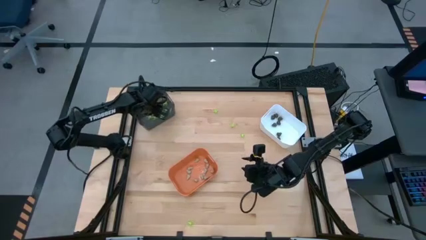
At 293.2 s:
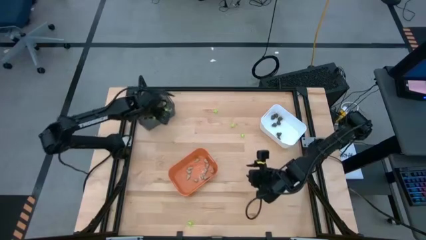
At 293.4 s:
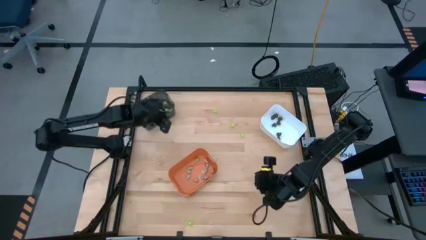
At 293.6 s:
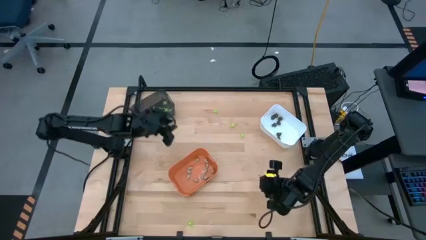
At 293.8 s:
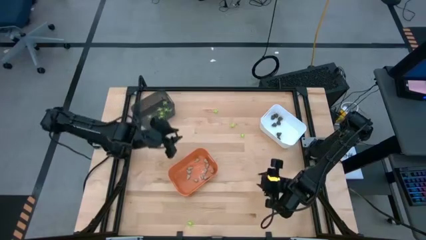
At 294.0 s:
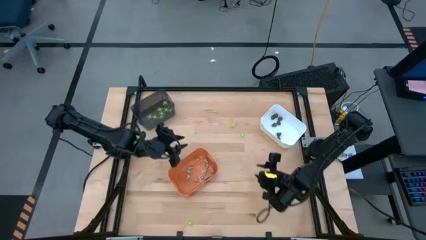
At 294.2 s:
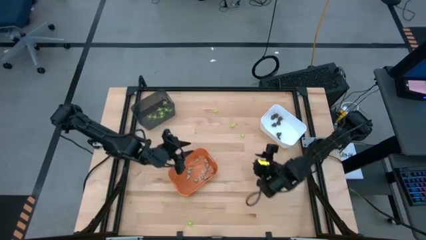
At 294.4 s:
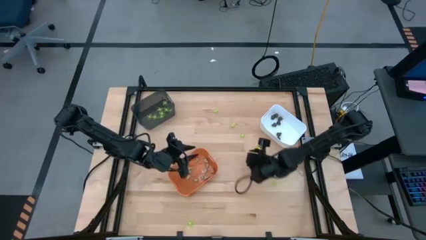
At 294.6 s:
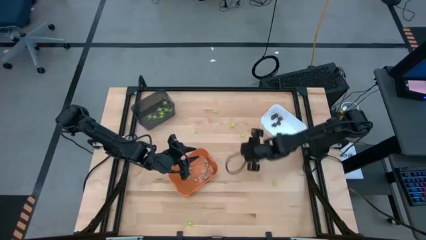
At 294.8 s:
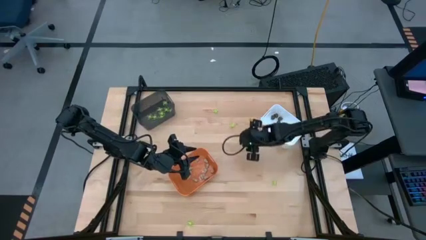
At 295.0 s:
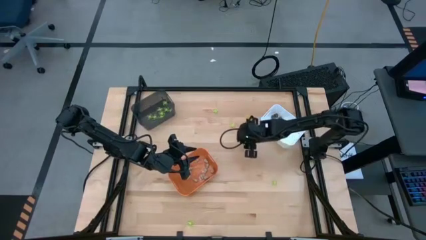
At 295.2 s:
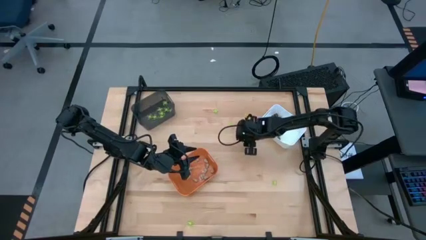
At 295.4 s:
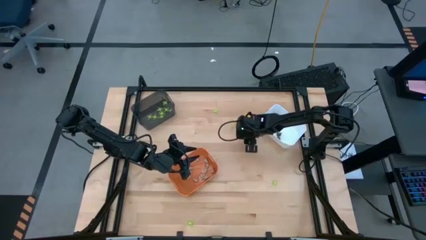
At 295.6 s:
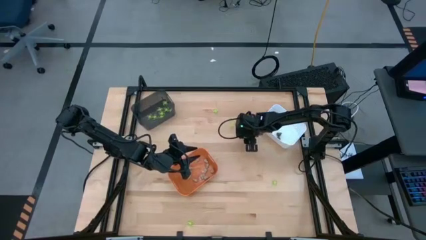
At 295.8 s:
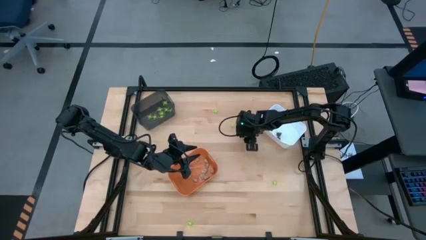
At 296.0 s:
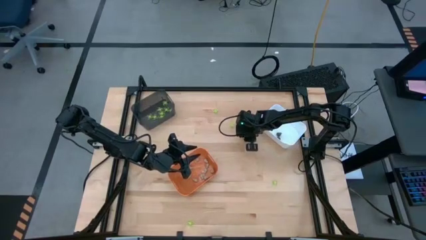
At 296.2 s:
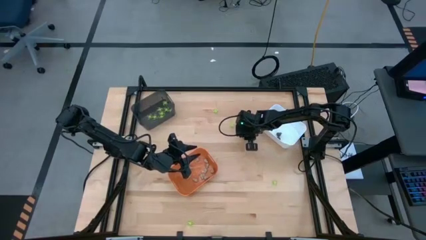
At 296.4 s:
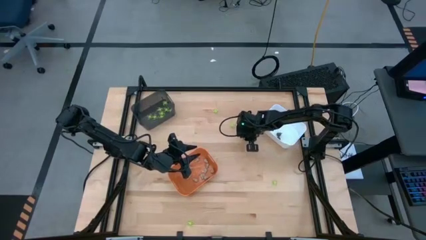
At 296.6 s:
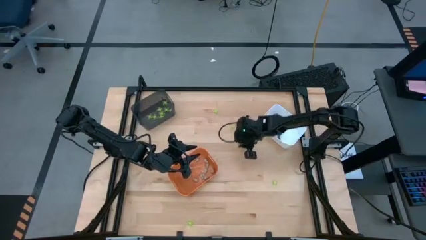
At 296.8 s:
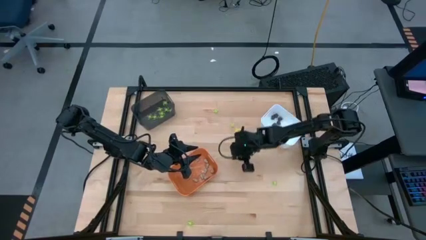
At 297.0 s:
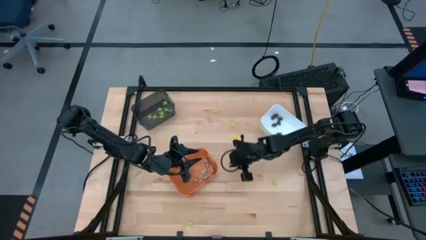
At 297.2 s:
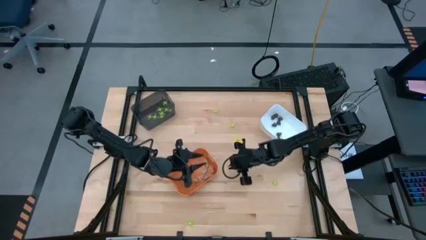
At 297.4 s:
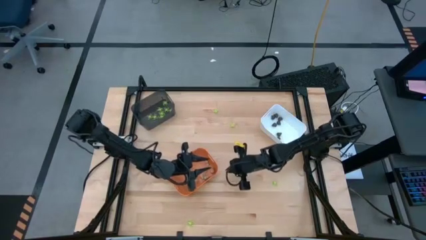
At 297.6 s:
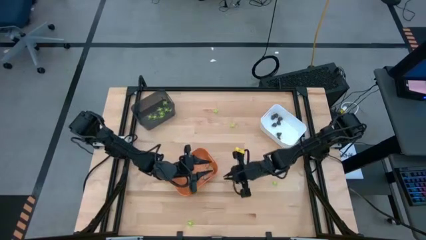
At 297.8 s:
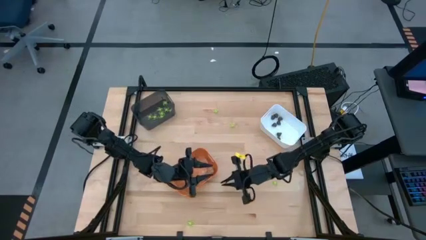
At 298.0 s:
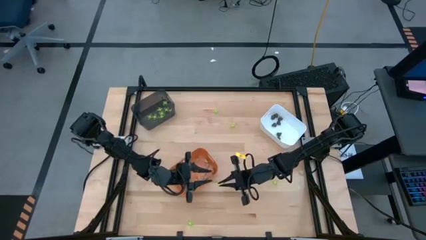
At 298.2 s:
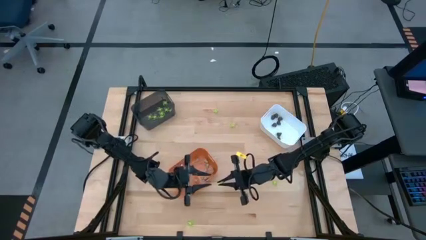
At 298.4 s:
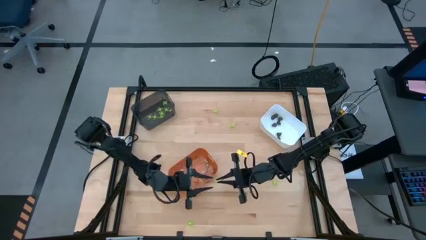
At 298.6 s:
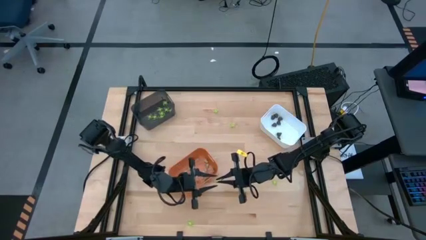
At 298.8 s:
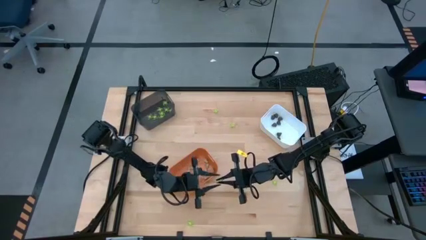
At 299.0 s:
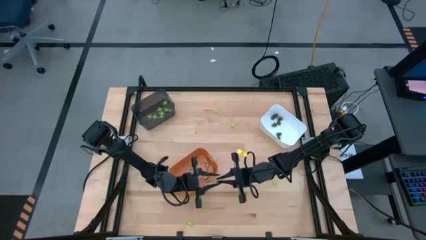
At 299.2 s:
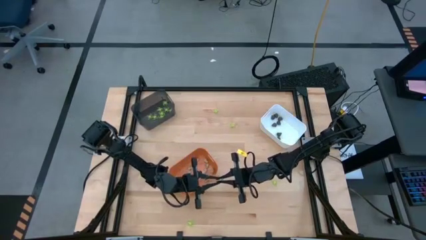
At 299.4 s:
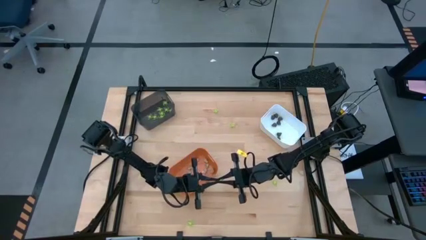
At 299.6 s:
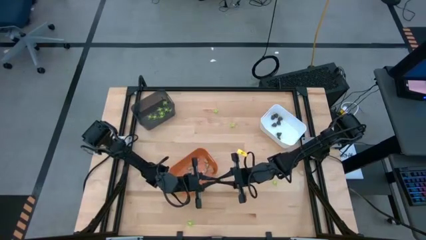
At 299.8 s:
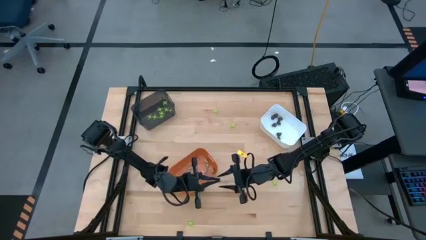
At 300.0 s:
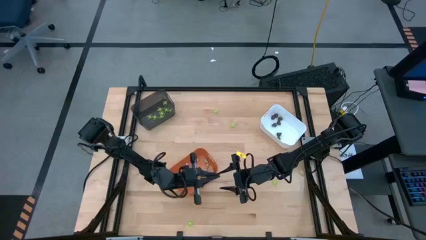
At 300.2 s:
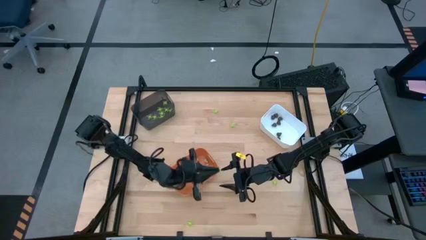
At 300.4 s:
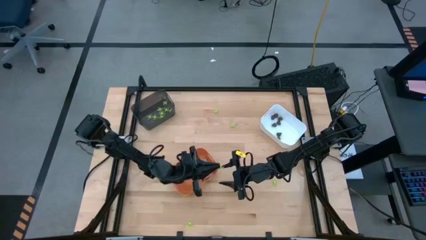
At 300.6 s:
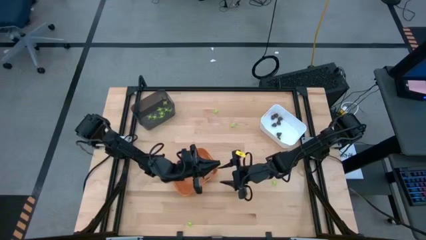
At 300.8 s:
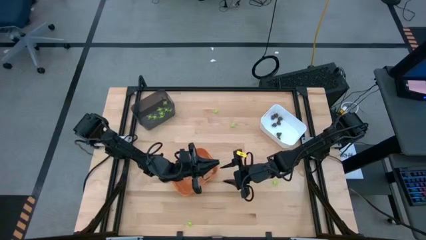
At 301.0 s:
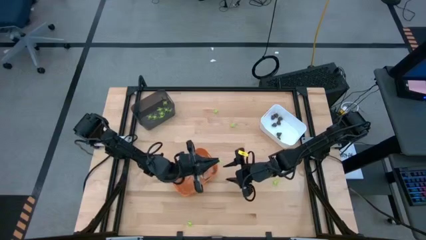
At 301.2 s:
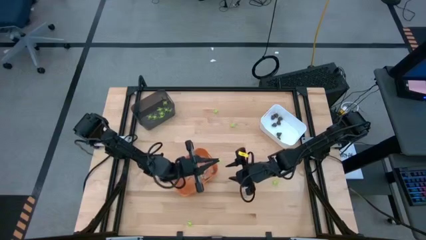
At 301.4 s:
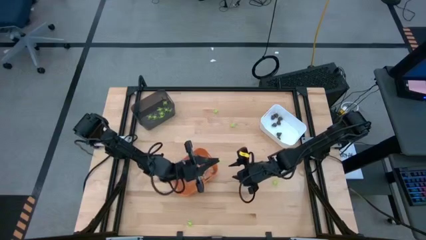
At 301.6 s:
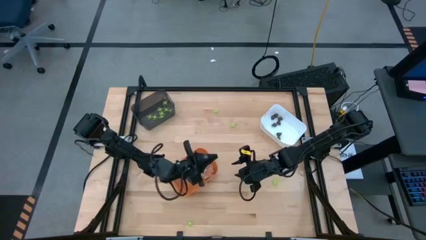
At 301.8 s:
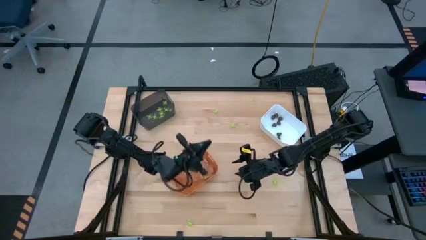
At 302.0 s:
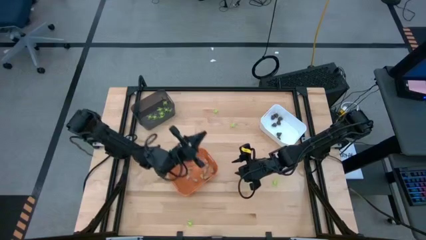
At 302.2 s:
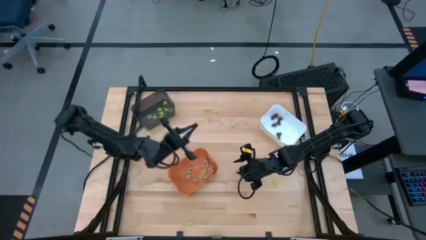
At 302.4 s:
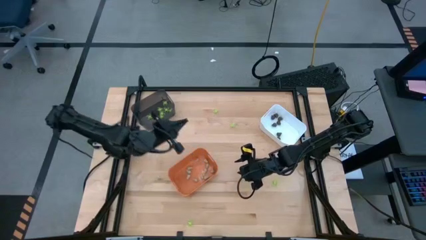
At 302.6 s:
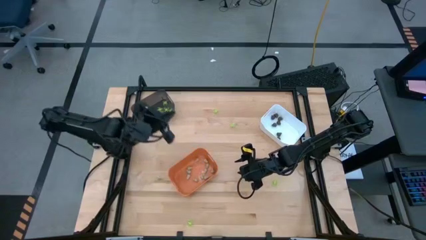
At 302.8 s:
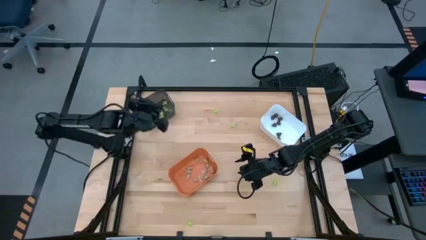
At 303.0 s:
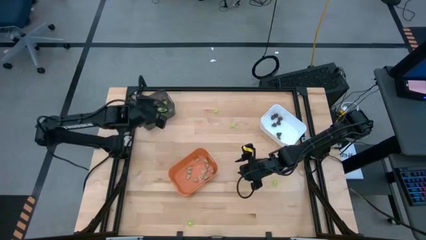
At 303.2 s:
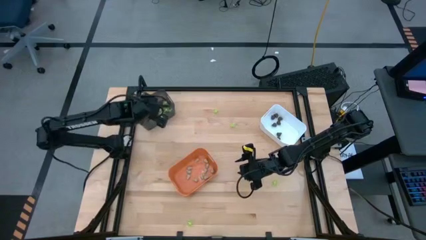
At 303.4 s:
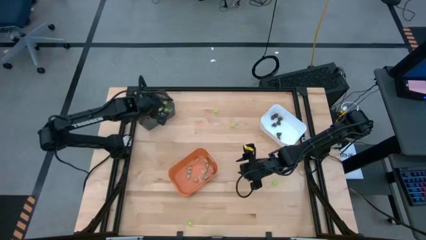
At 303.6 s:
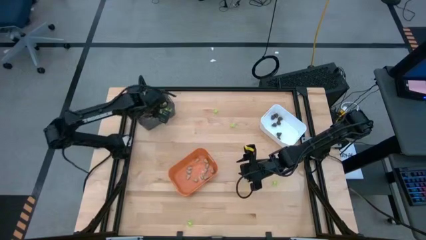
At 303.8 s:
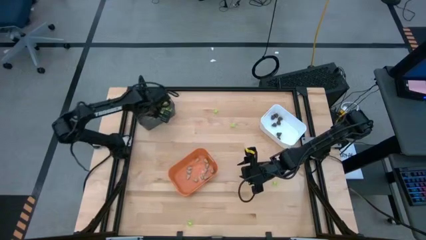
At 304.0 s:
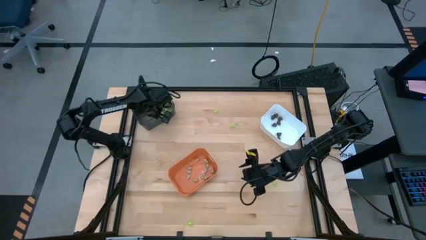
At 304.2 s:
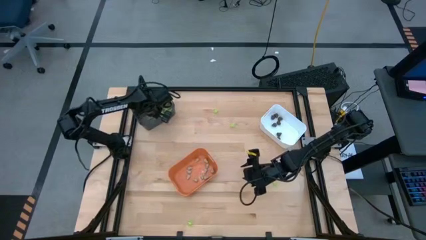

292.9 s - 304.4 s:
Task: Sort Halloween decoration
Put the green spider toy into the black bin

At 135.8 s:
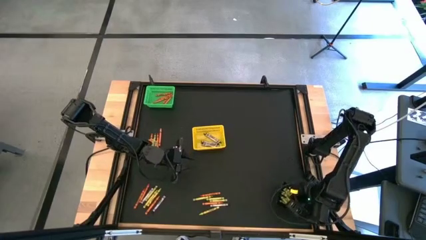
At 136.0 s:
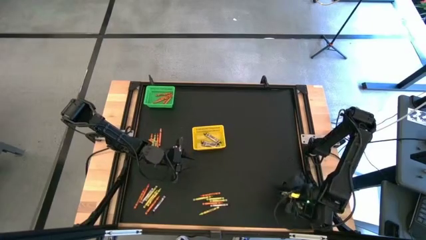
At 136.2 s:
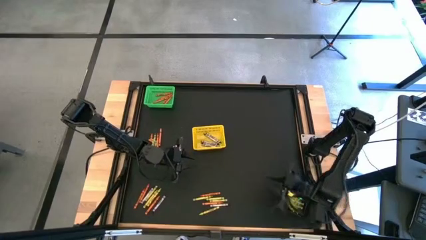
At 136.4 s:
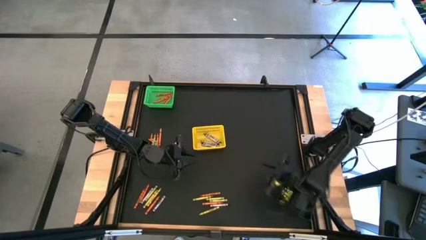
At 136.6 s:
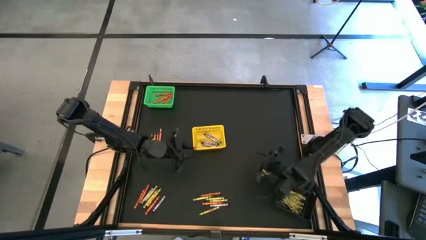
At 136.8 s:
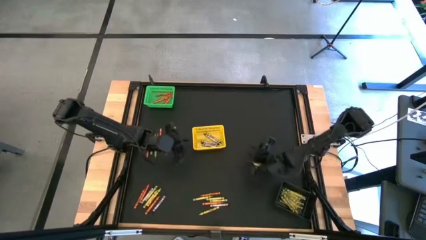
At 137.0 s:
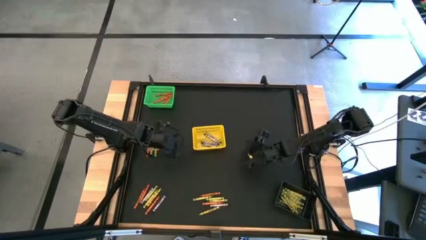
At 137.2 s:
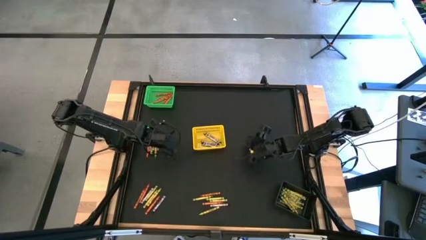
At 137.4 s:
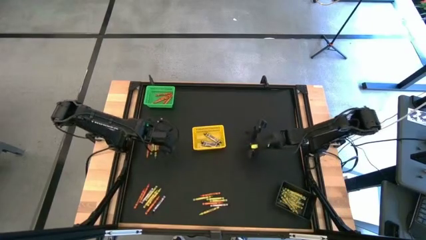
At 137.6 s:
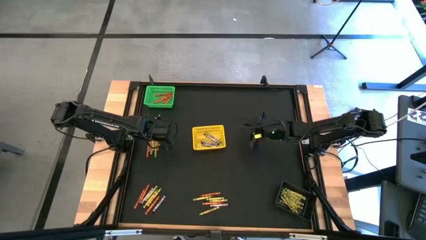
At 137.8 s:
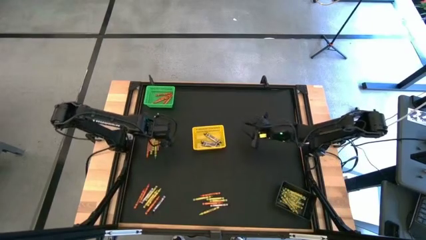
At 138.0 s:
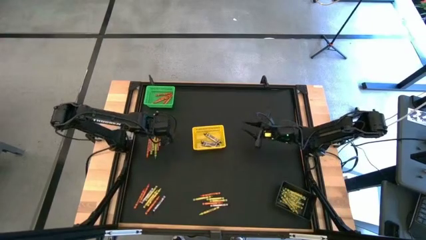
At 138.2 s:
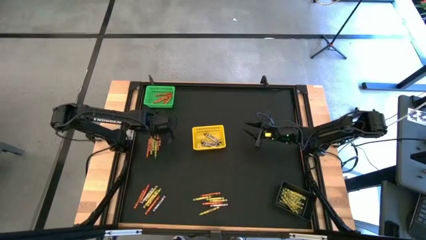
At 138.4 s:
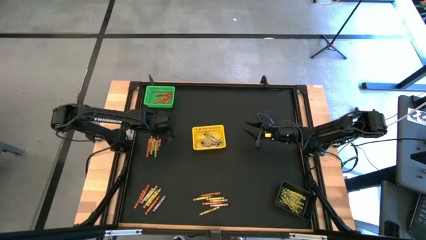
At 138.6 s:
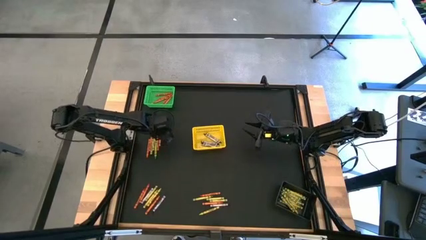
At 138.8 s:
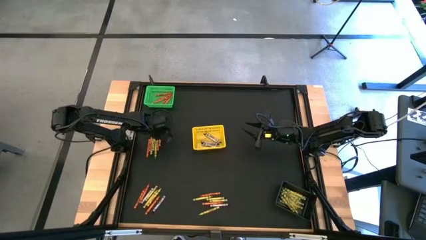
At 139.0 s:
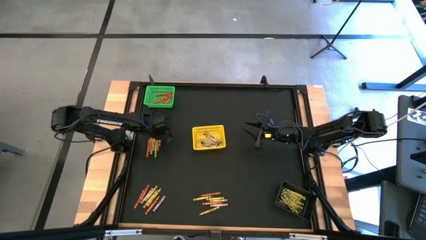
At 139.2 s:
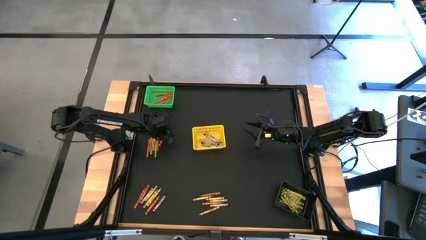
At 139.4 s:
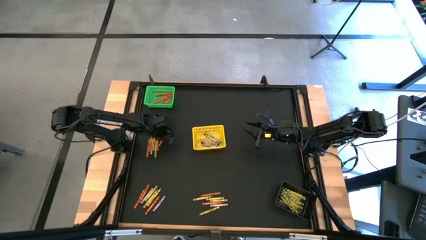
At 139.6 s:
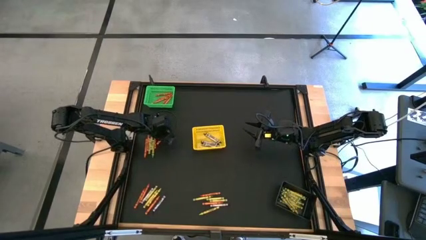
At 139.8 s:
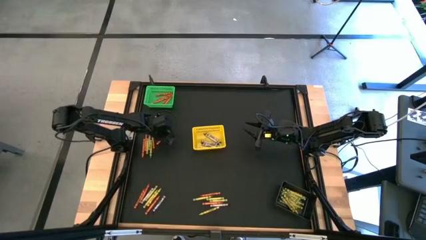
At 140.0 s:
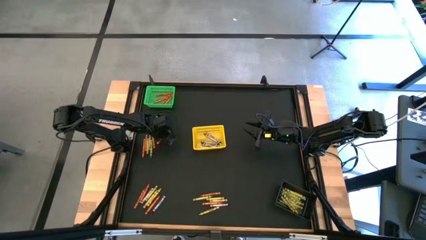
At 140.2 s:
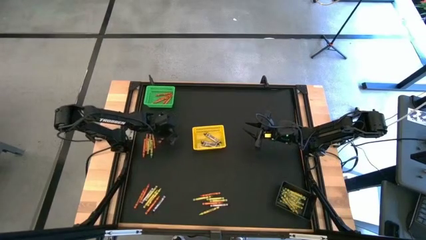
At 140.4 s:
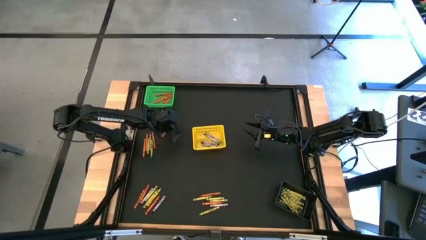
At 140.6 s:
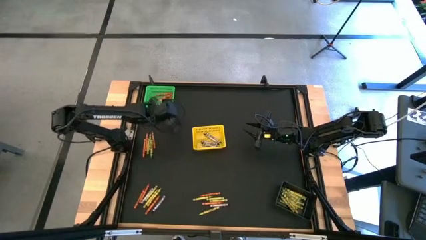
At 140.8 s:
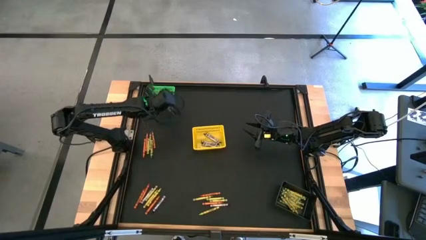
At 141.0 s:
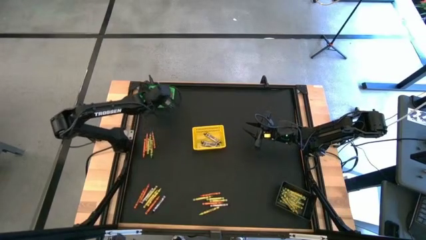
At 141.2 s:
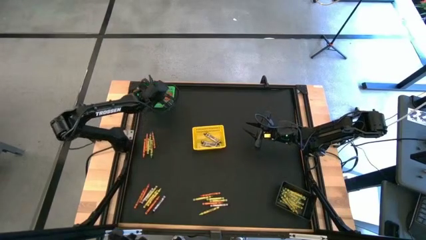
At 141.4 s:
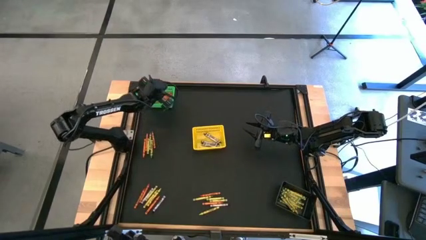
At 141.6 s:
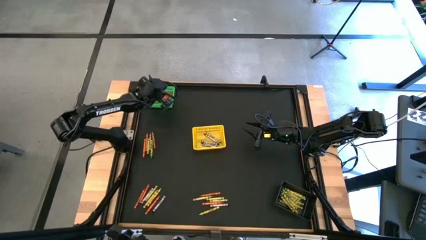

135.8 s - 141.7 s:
Task: Sort crayons
Put the orange crayon into the green bin
